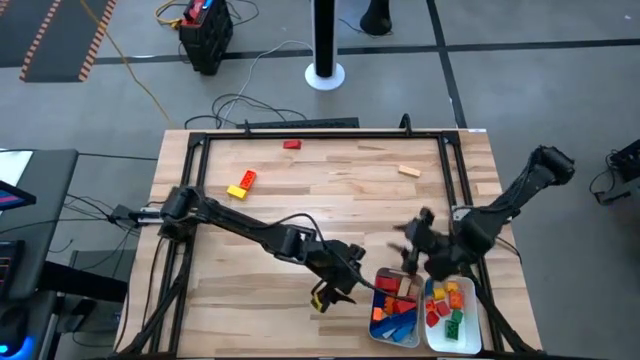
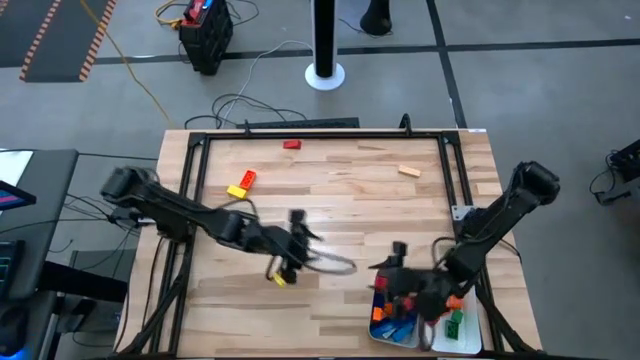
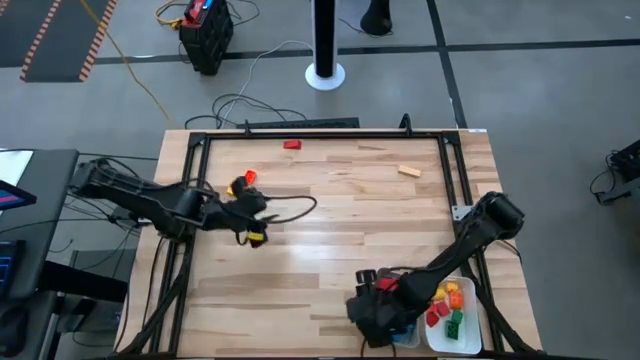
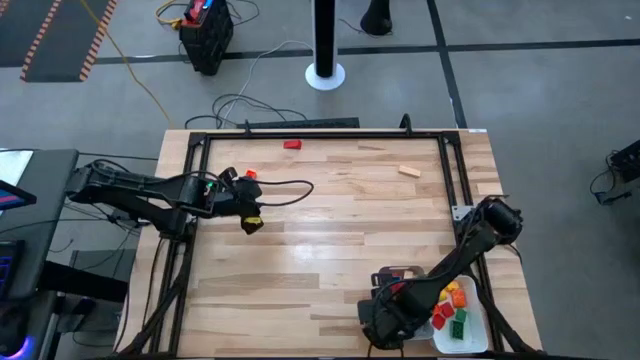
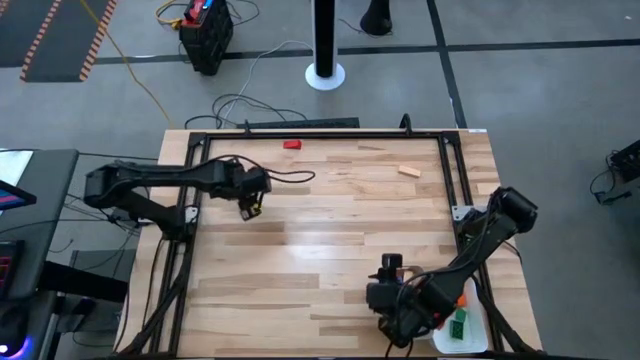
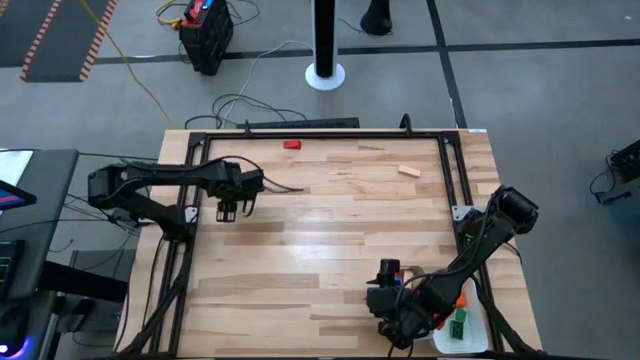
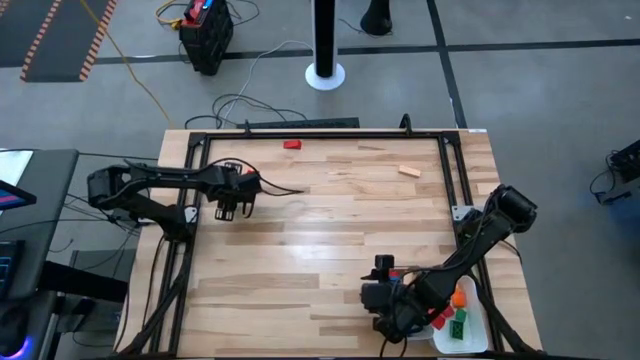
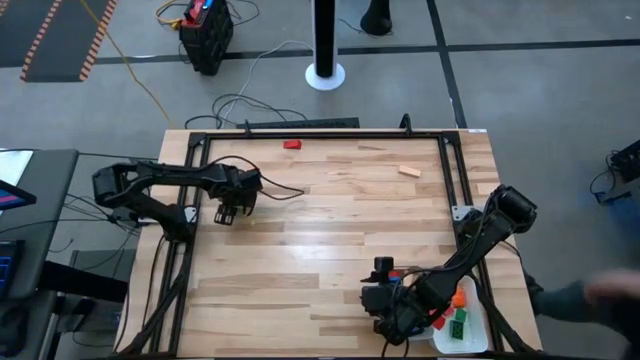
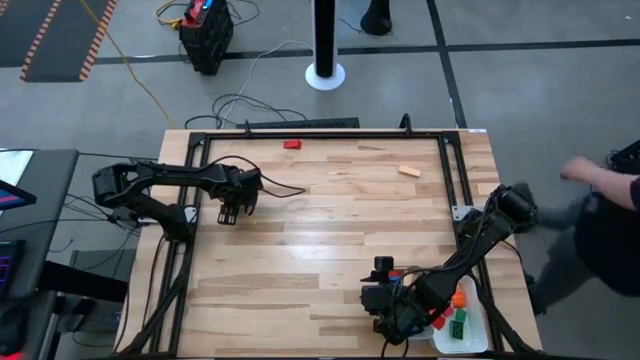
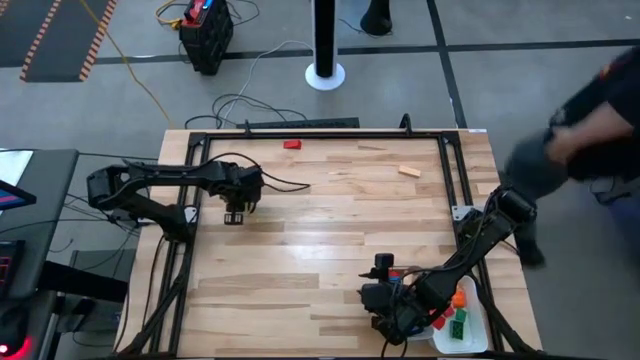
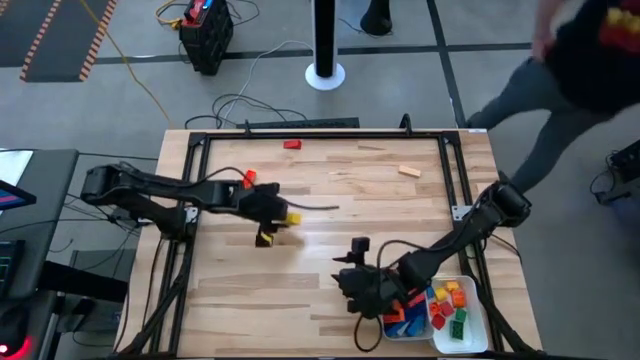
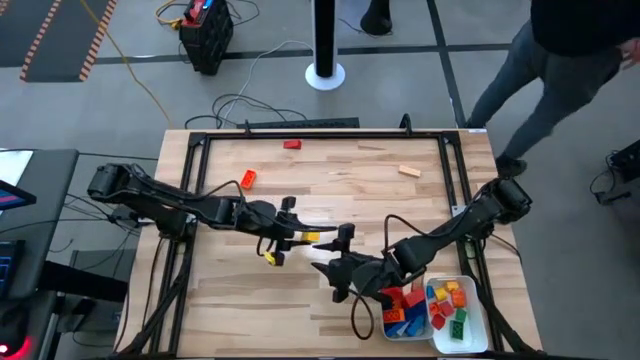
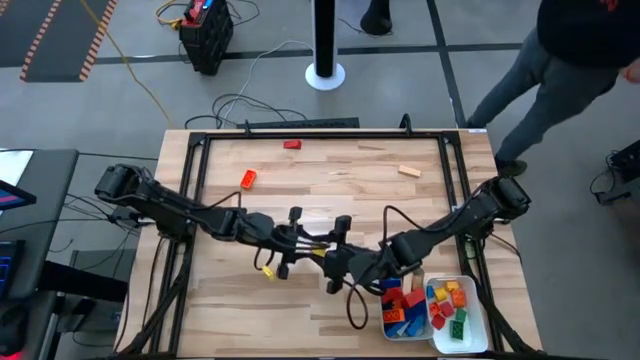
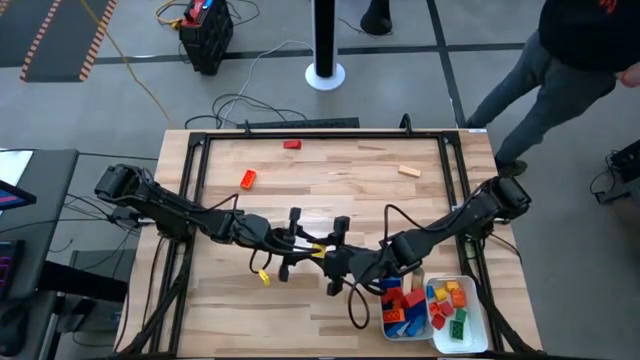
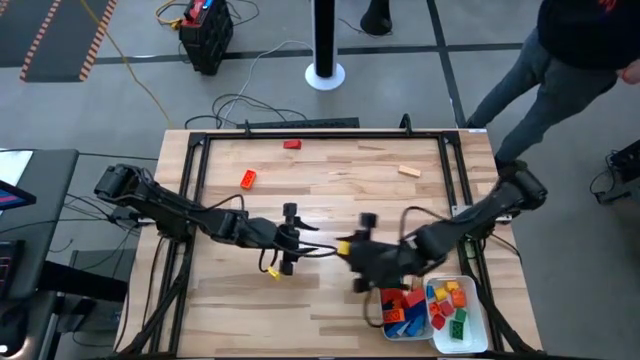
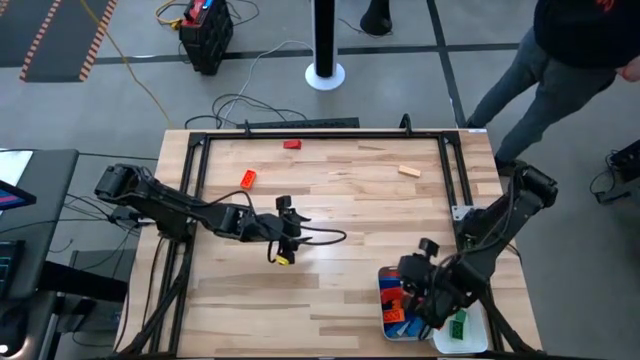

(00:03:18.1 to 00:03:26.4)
Task: Sort blocks by size
Put the large yellow wooden block into the gray bin

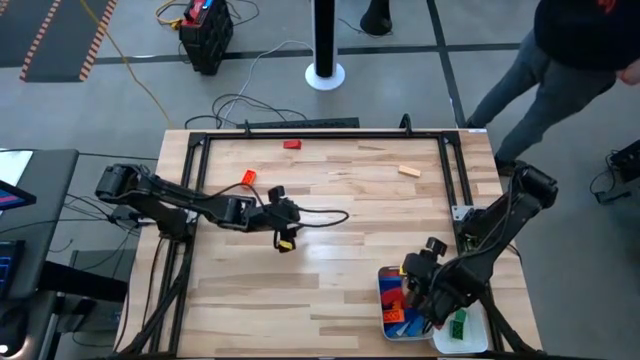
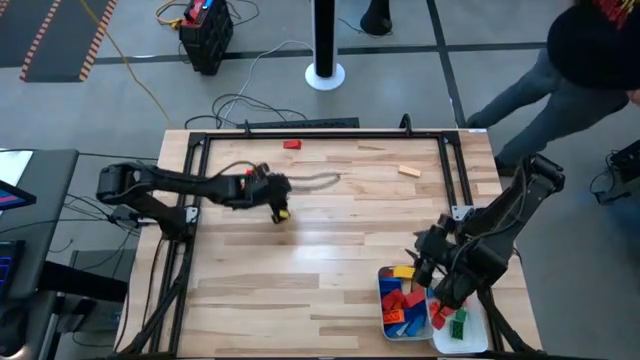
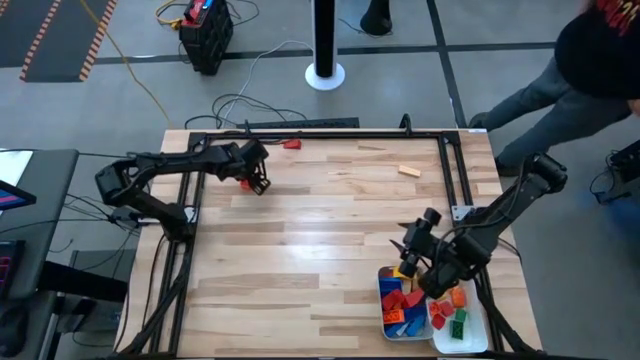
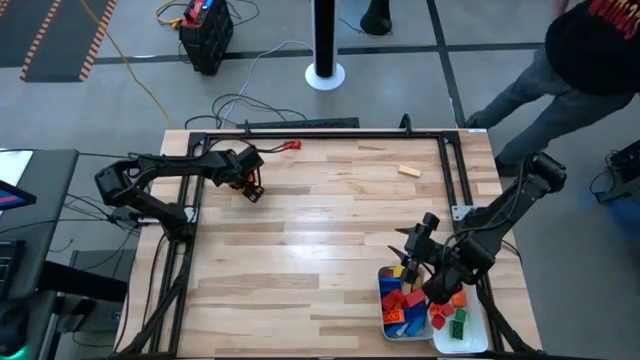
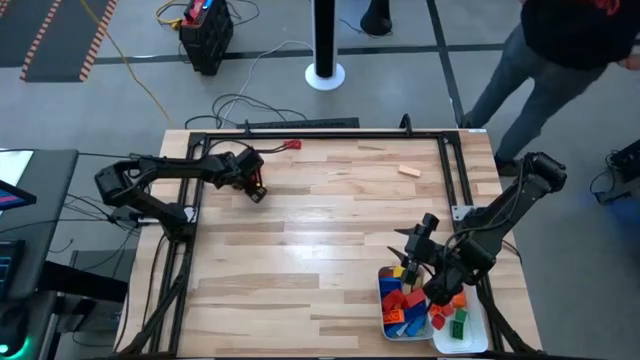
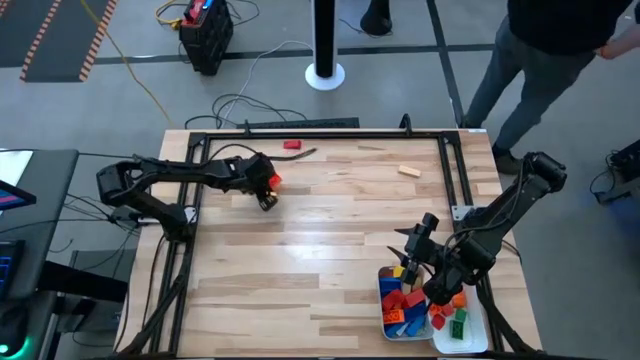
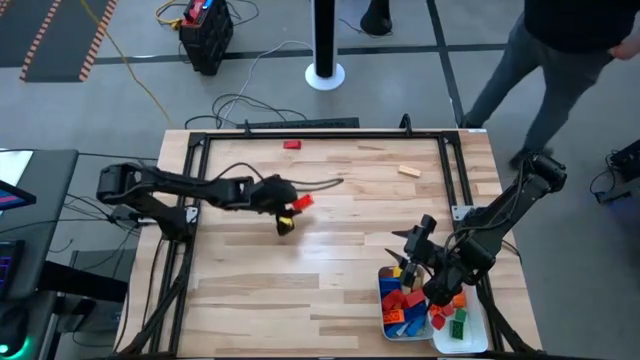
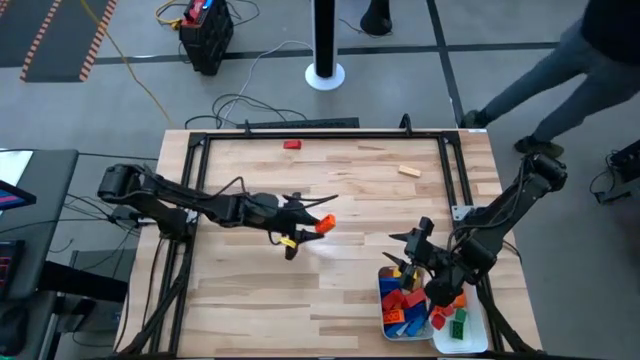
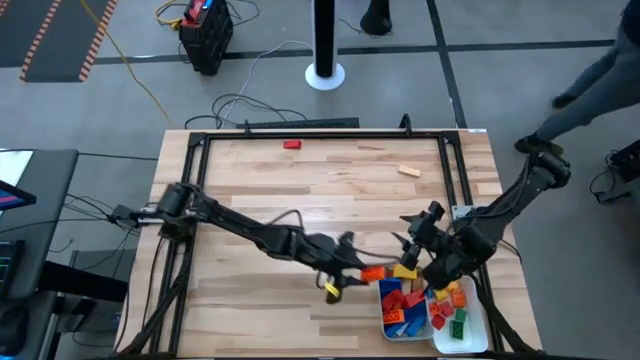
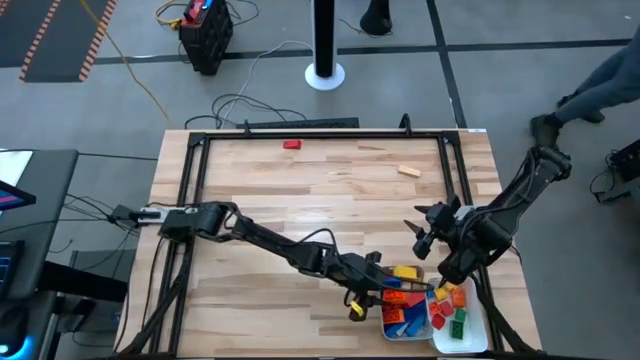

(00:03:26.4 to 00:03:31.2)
Put the large orange game piece into the gray bin

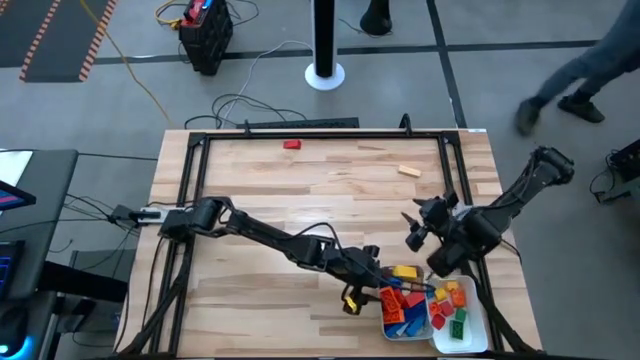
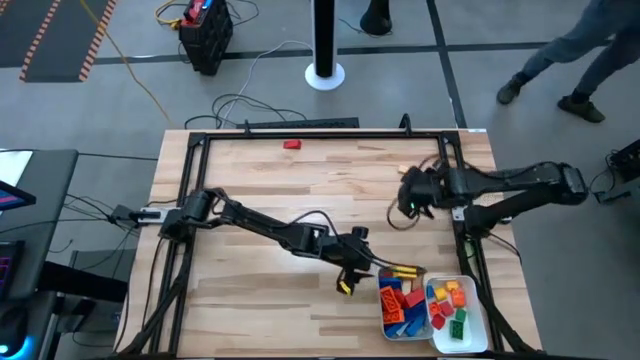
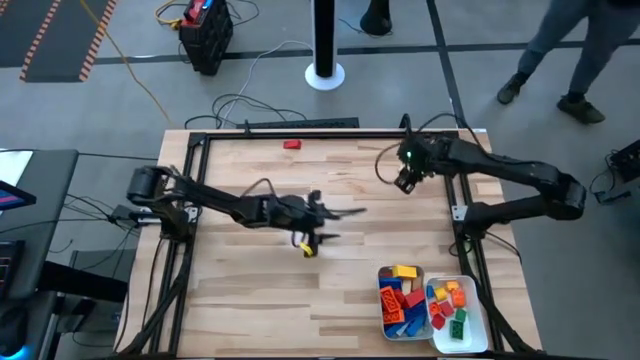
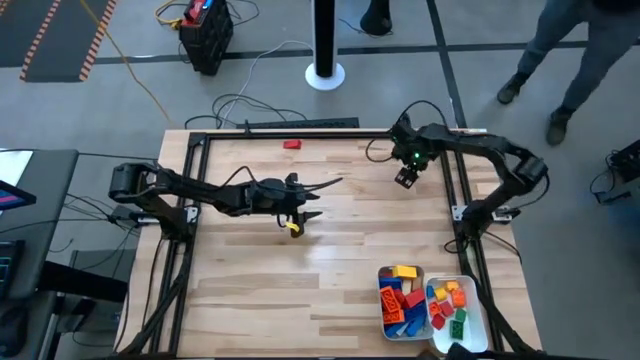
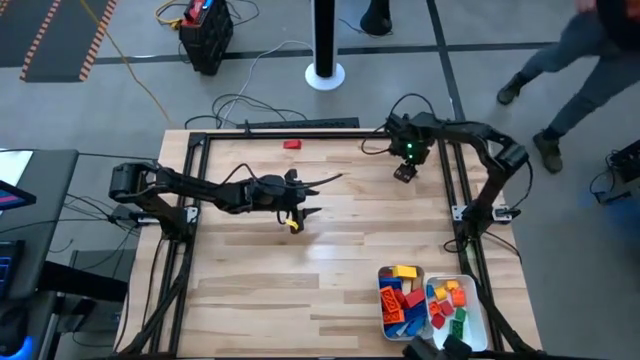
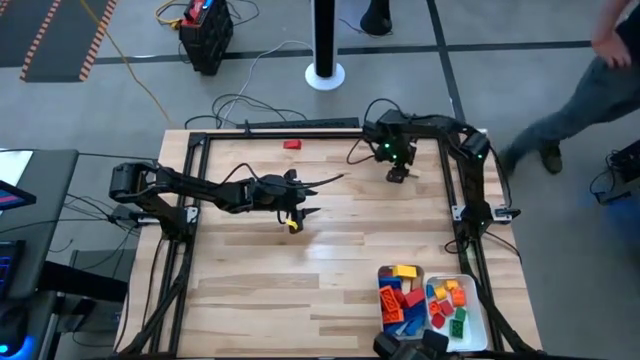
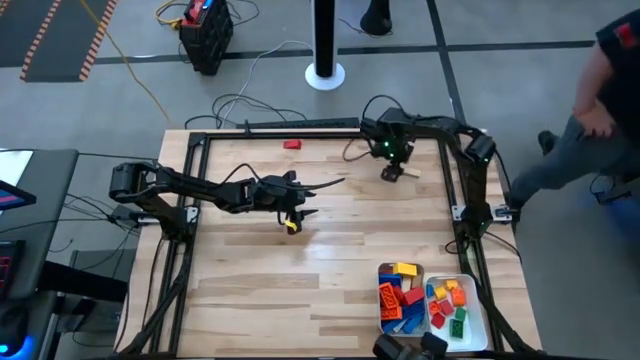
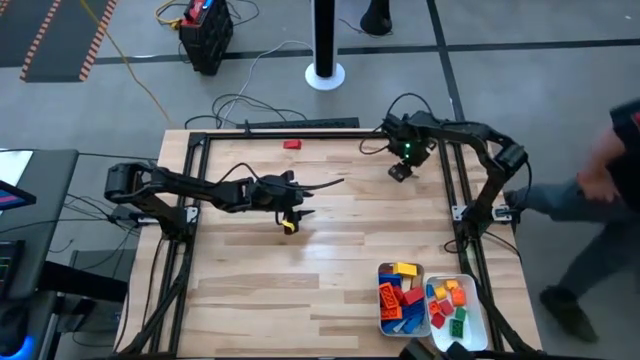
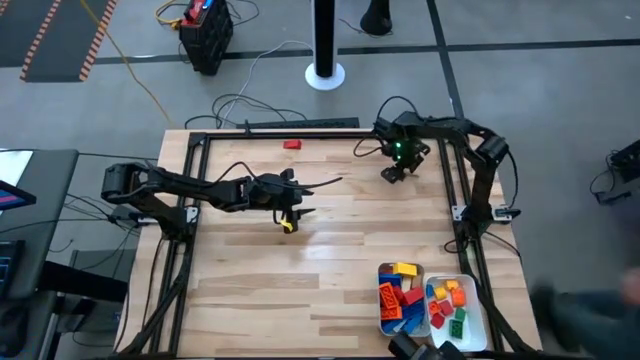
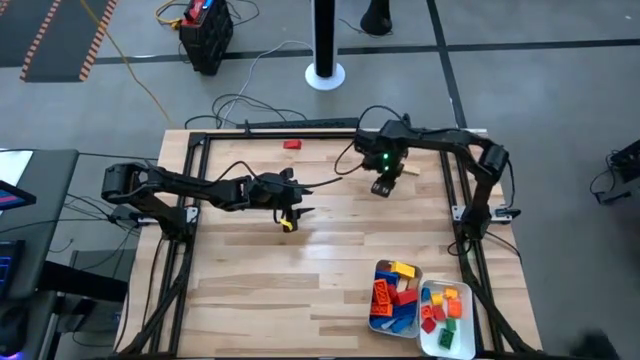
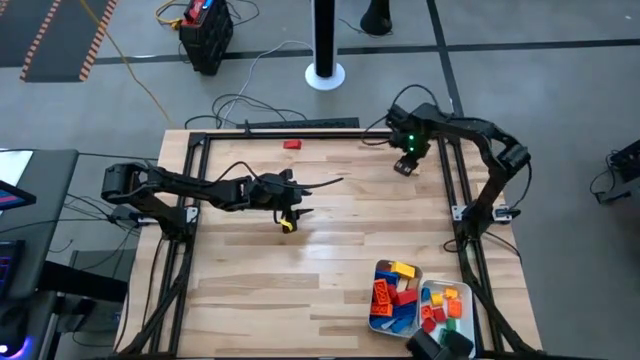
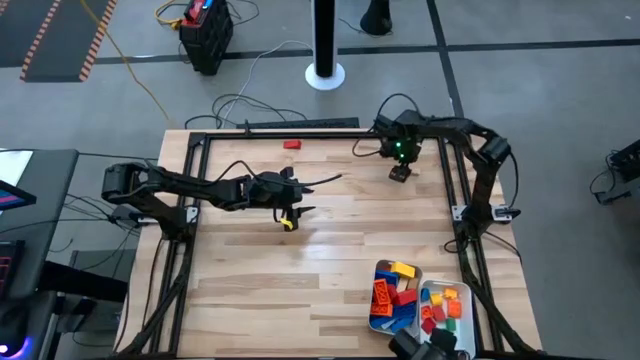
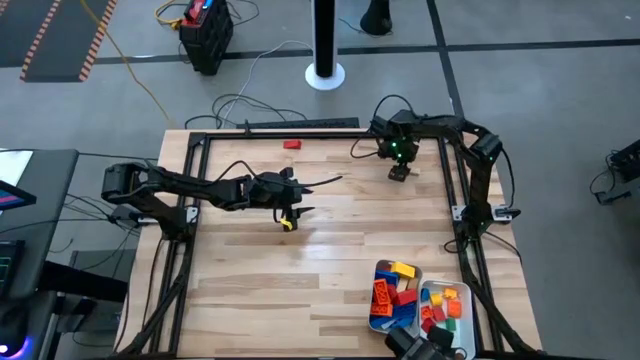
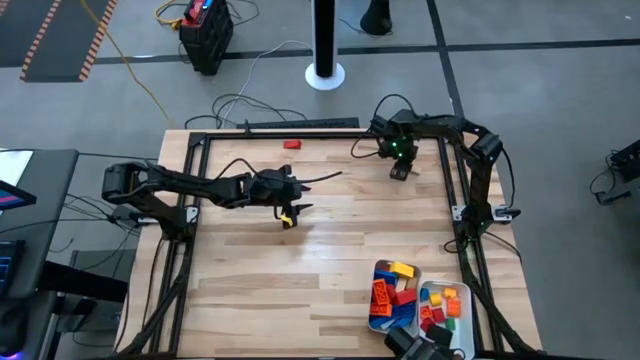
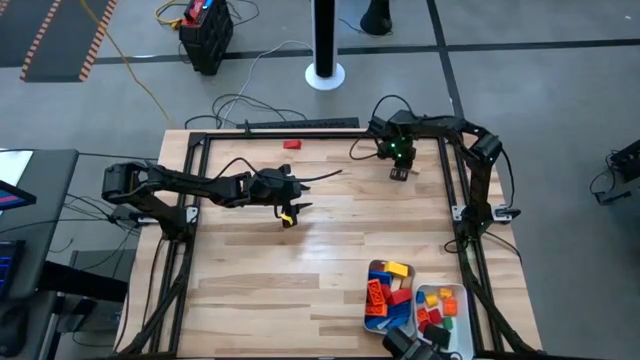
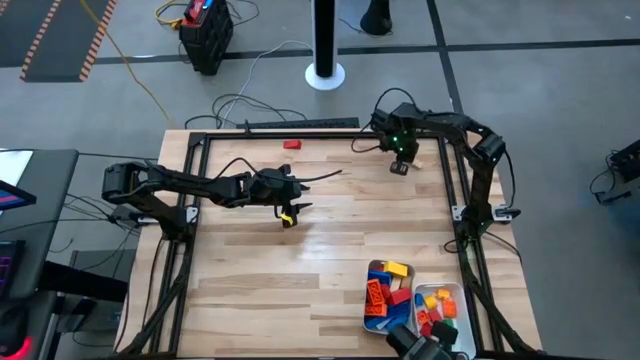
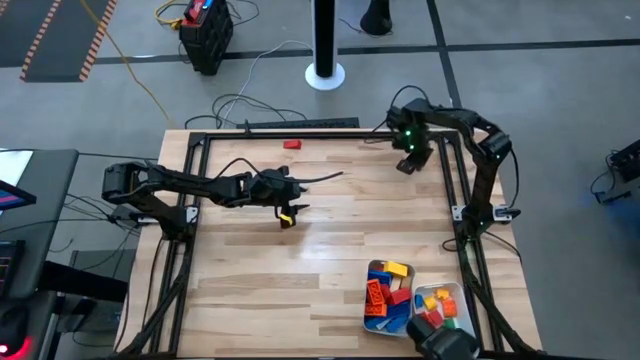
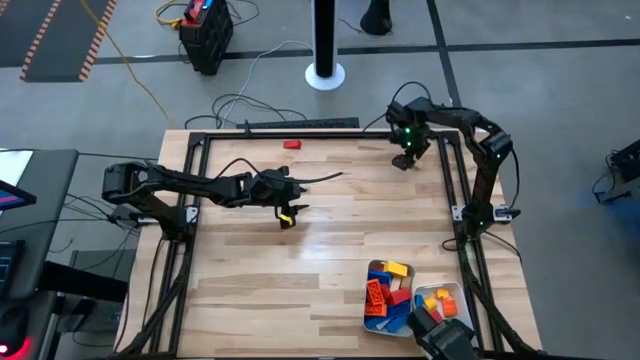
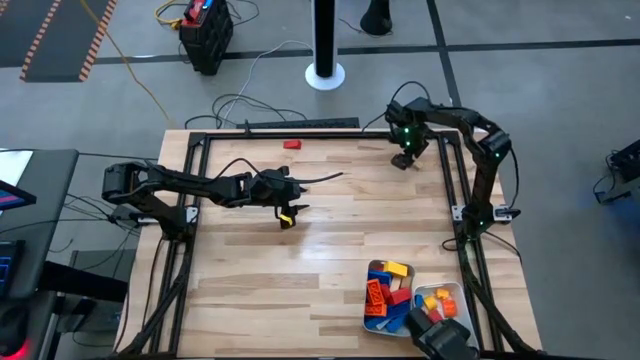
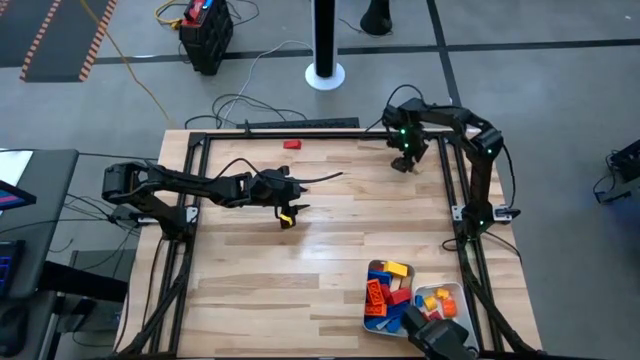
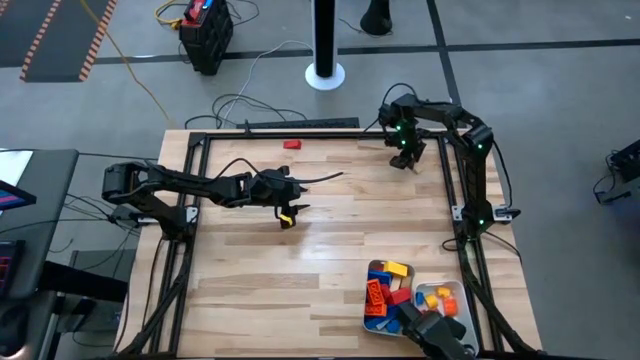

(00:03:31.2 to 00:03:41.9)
Put the large light brown wooden block into the gray bin
